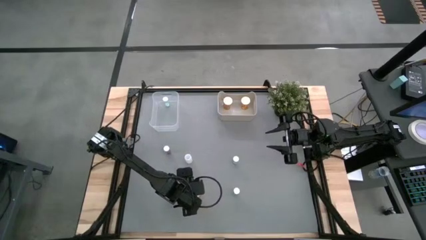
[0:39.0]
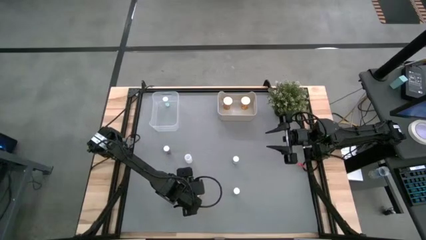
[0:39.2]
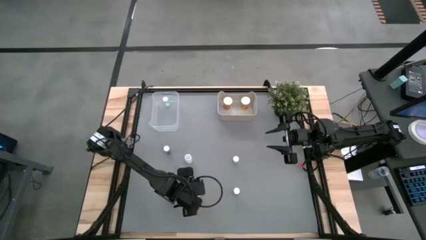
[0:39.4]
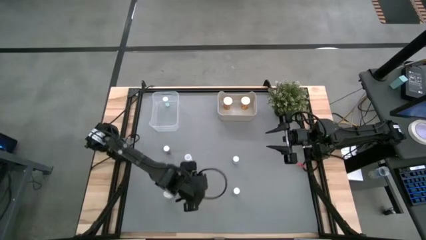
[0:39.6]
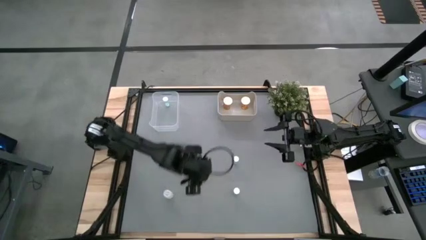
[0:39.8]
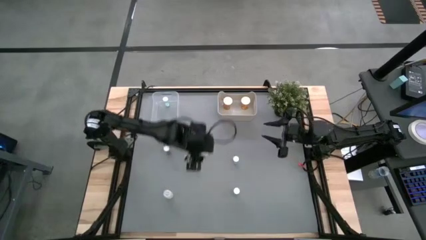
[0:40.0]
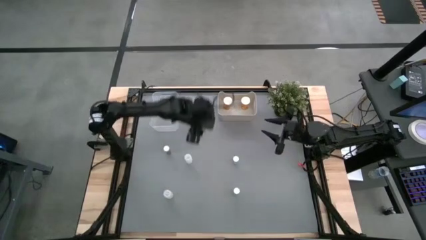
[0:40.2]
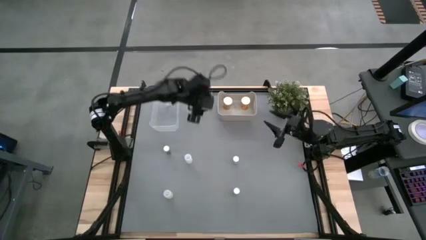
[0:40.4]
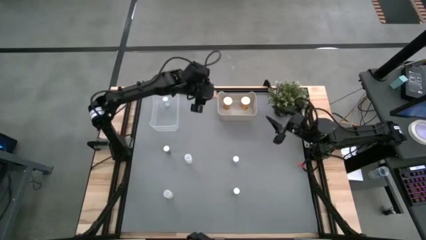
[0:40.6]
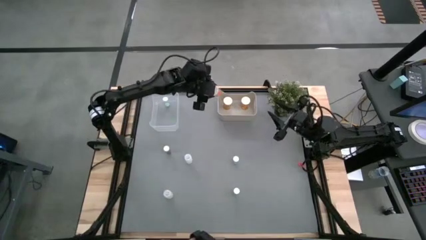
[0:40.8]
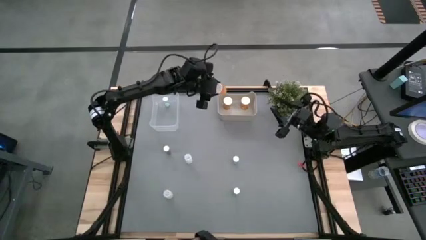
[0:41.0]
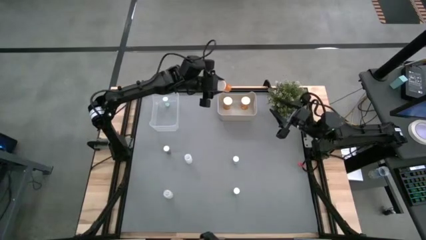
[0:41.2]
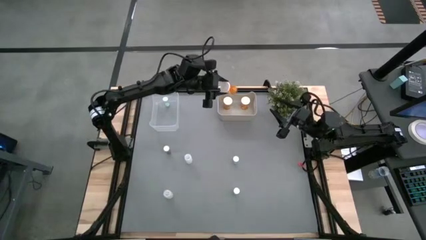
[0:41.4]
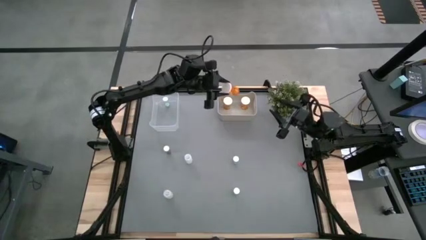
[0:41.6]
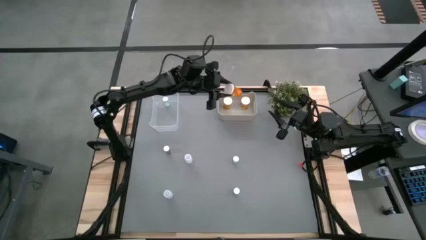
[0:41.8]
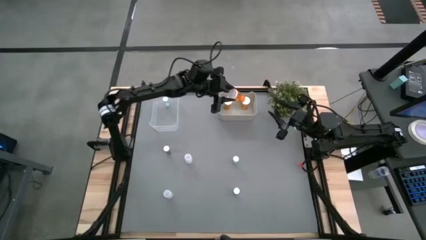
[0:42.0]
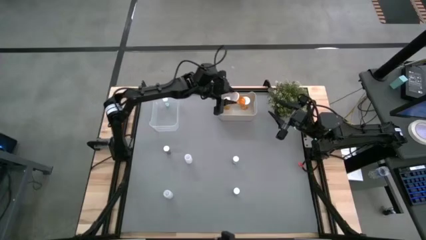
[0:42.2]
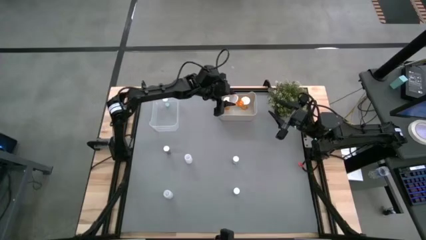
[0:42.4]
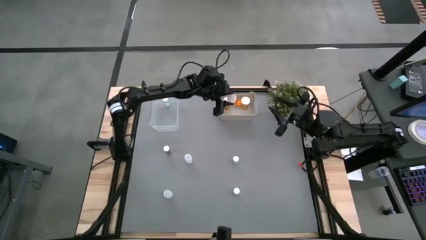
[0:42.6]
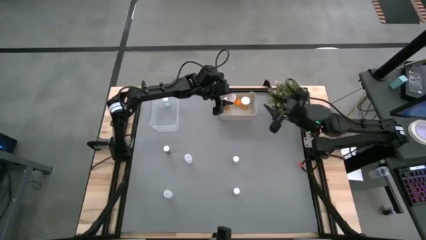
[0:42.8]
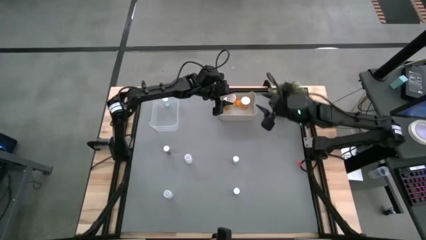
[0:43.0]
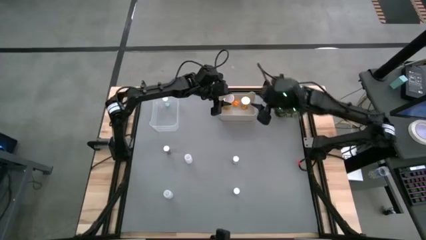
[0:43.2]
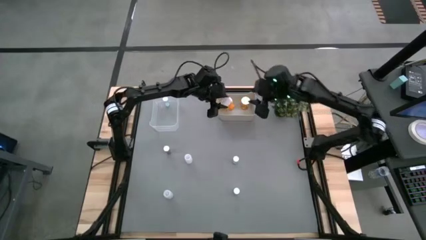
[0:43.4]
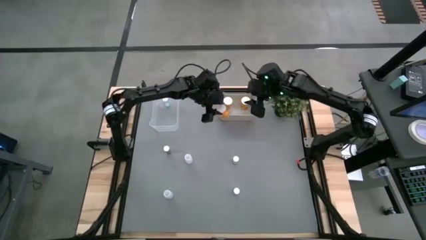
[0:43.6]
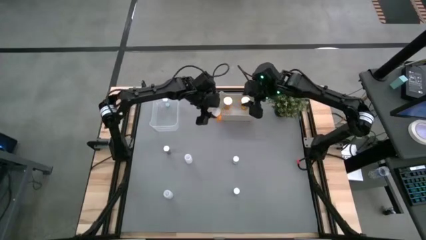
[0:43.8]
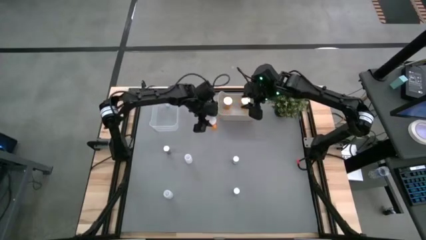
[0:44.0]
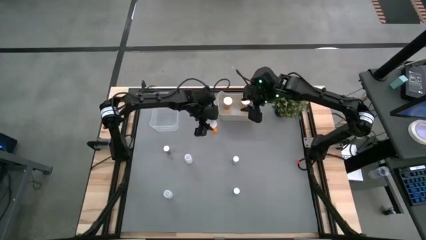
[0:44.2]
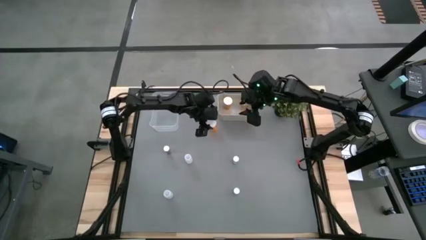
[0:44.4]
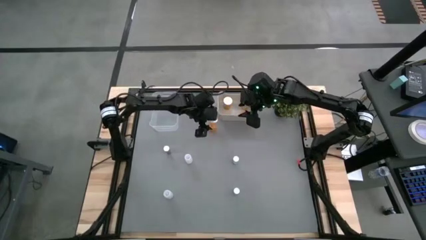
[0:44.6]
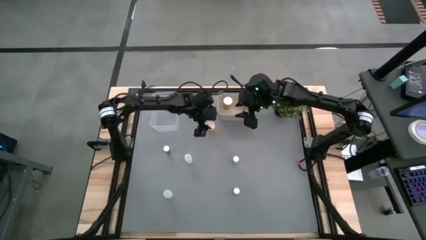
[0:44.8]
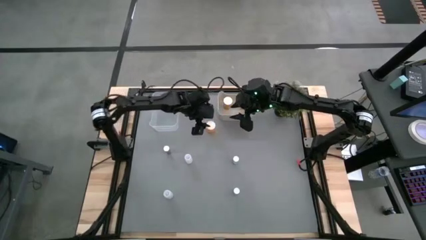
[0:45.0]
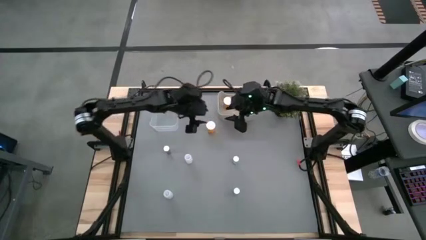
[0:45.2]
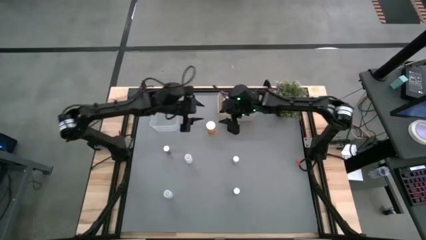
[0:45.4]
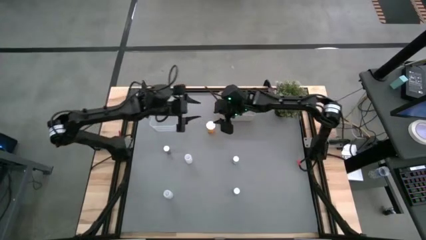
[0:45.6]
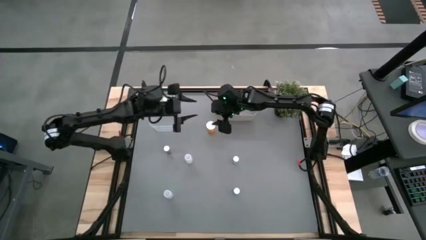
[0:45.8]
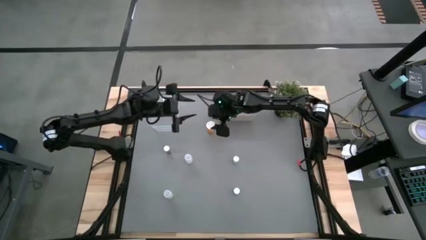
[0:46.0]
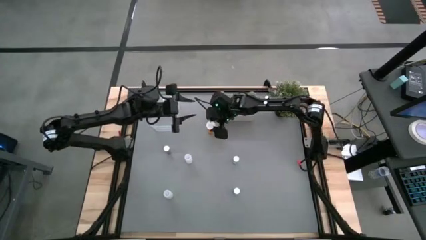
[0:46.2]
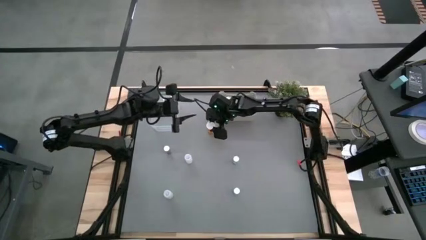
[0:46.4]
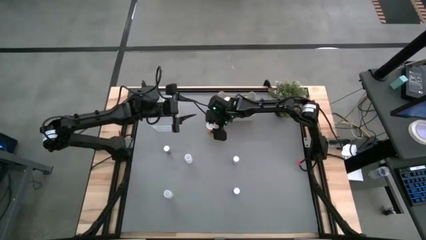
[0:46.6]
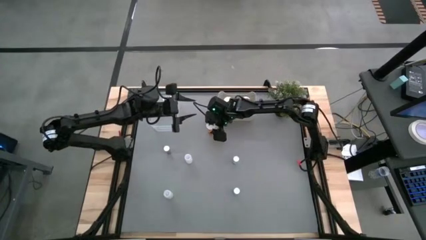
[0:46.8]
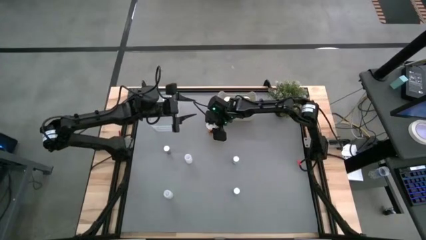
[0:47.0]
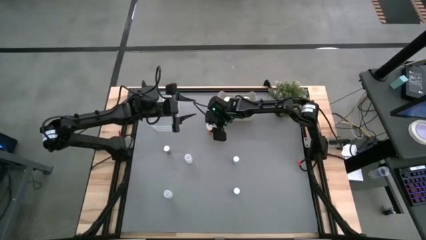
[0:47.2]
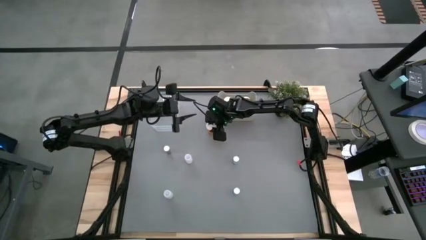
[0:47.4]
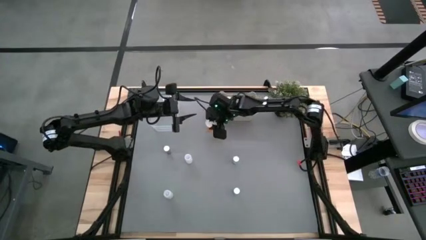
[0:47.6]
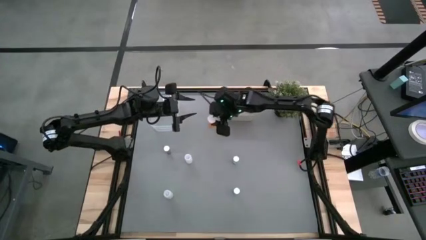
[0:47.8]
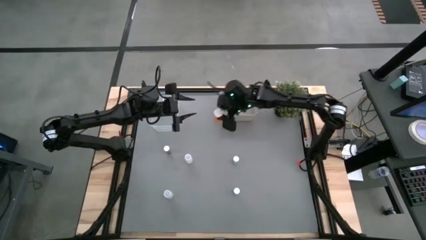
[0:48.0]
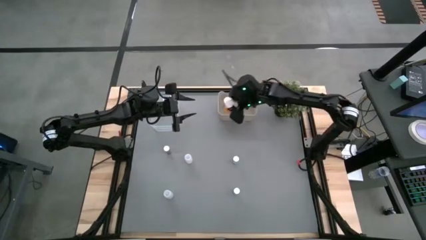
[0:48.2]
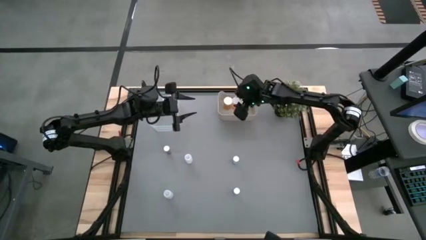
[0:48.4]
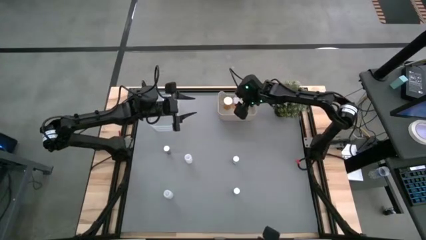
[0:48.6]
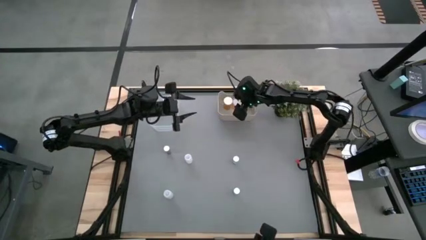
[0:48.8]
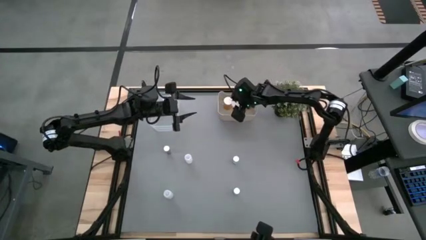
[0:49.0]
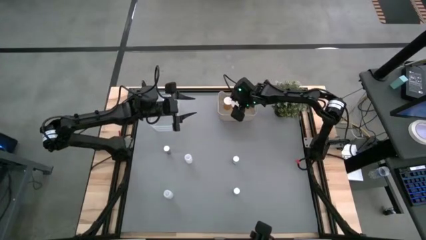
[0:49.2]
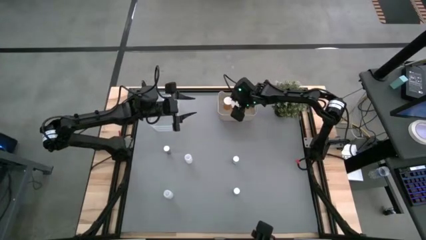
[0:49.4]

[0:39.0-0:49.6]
Task: Pick and place medicine bottles into bin by pill shape (circle, oval)
Put the orange capsule bottle into the gray bin

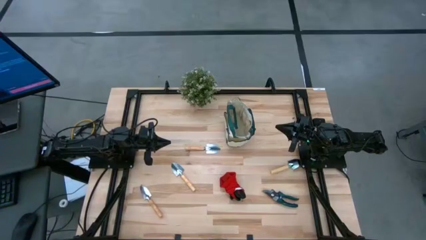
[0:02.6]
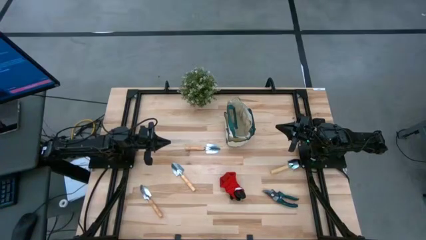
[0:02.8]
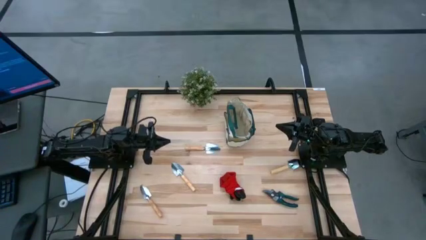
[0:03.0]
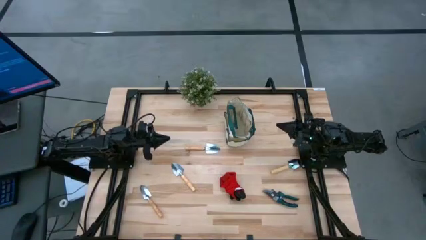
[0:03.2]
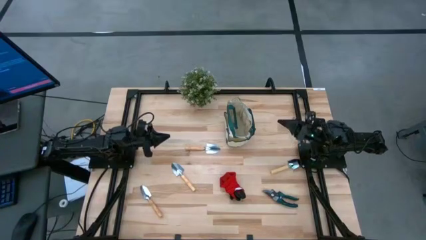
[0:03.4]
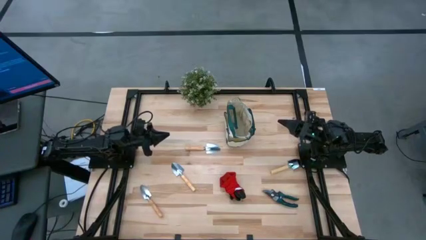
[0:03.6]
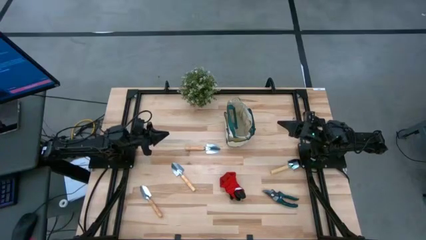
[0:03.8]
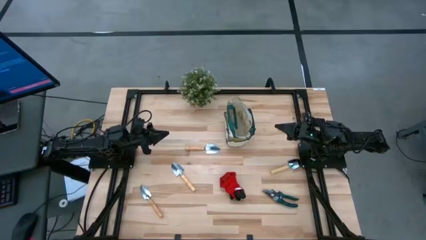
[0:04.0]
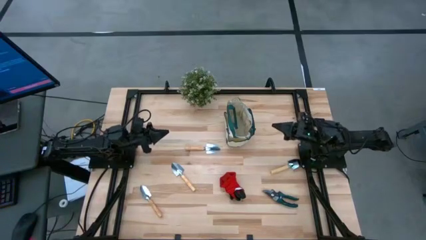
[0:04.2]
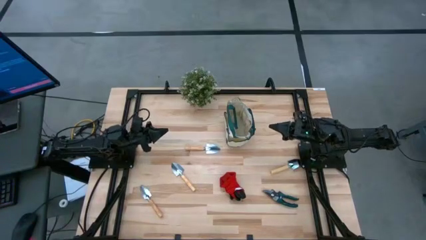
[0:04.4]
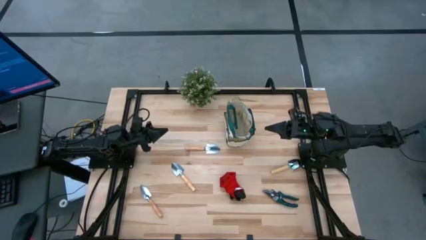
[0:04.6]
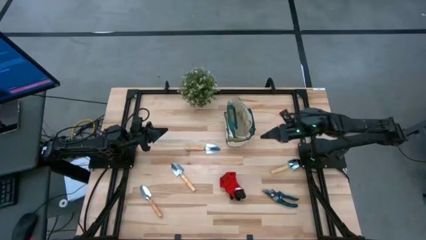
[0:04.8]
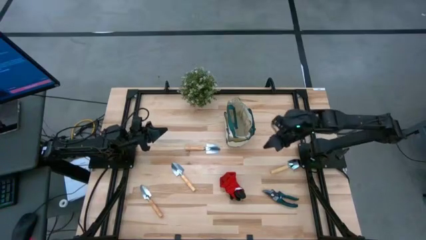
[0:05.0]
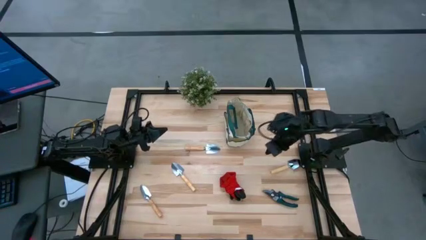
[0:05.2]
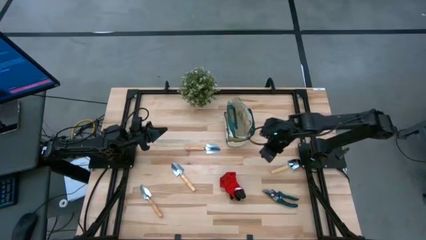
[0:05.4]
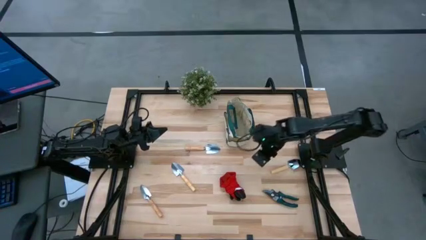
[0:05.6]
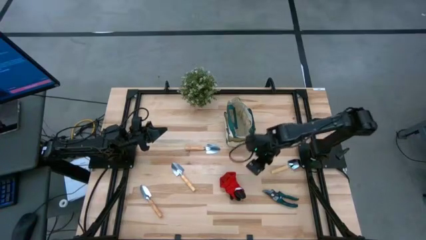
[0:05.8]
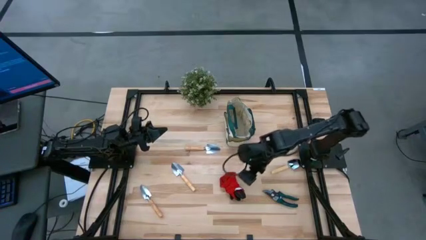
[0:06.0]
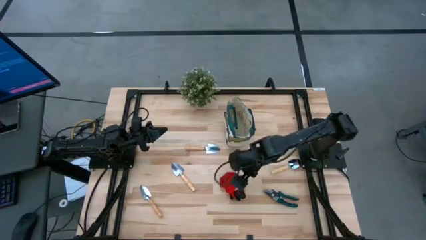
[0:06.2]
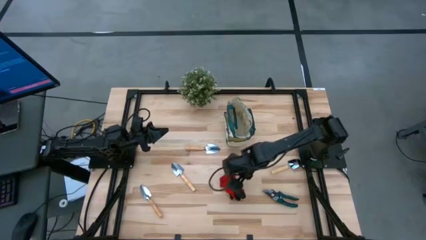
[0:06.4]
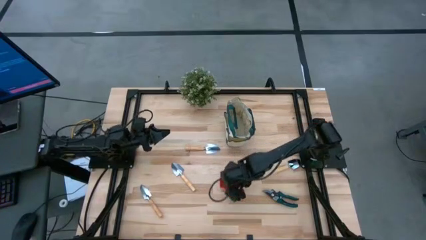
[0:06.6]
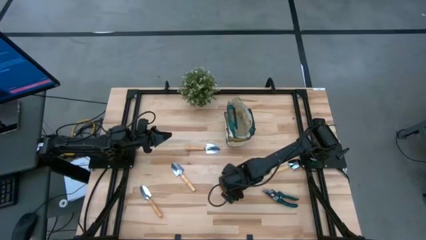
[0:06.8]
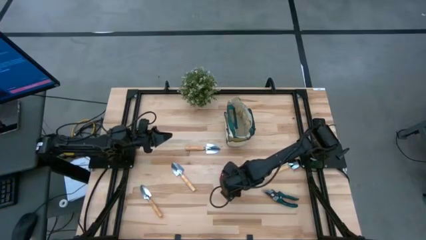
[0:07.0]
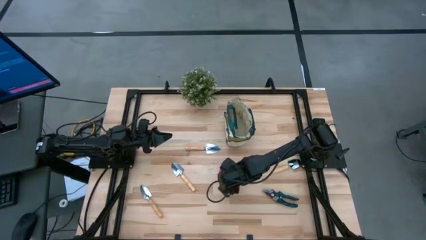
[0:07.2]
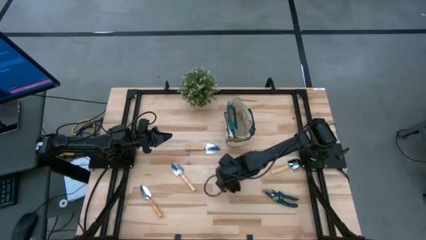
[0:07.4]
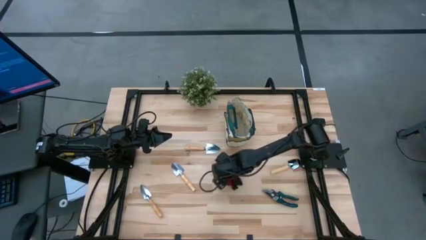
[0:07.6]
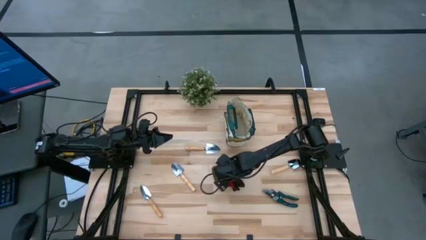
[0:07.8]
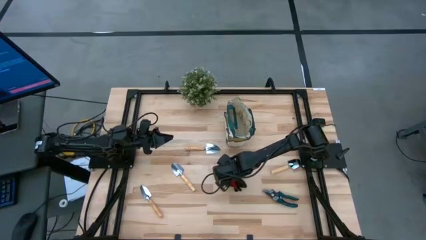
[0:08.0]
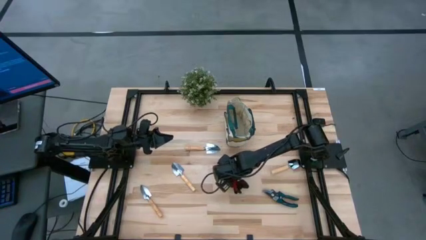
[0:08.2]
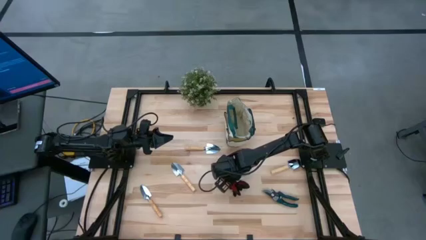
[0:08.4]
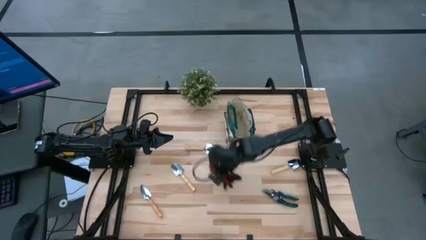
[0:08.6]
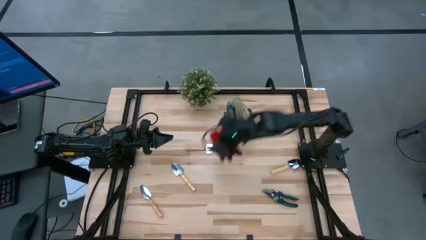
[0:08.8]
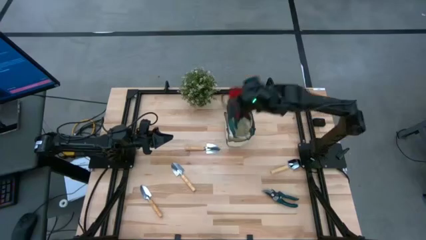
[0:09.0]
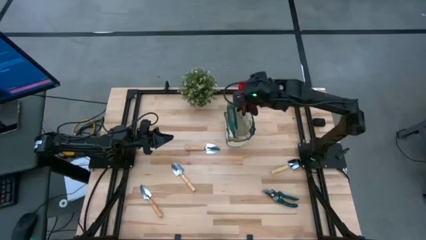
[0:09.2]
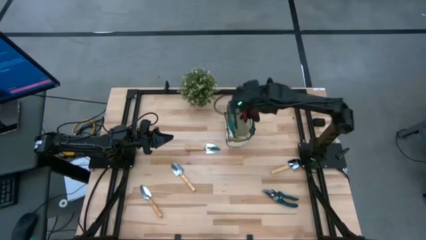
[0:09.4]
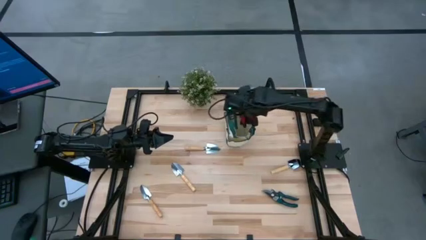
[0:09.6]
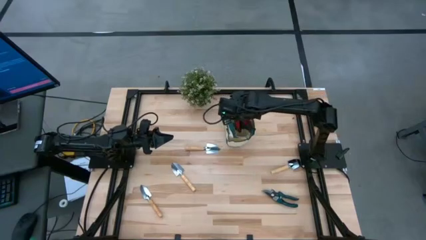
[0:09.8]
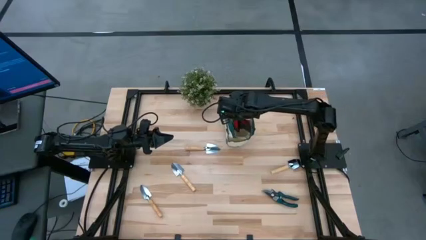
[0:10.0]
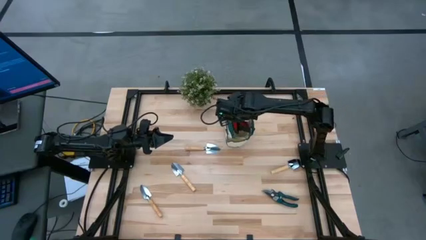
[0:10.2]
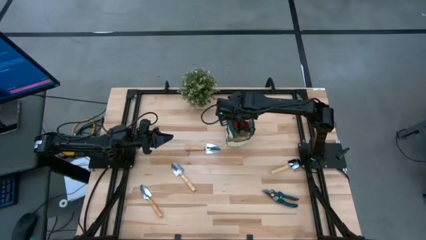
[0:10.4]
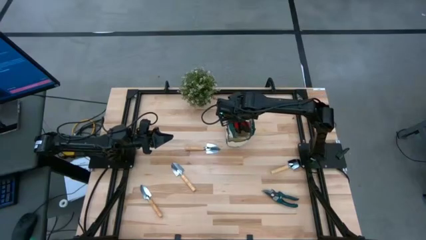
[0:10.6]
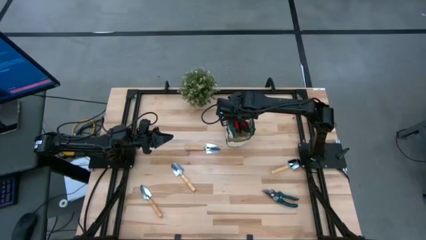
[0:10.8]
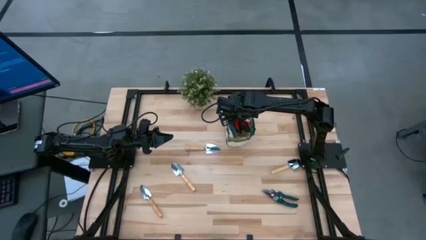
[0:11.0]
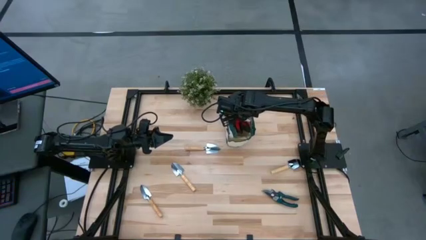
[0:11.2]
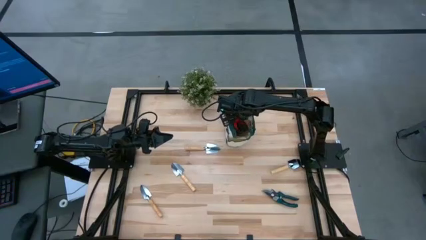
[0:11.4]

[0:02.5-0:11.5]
Task: Pick & Place Garden tools in Gardening bag
Put the red gloves into the white gardening bag
